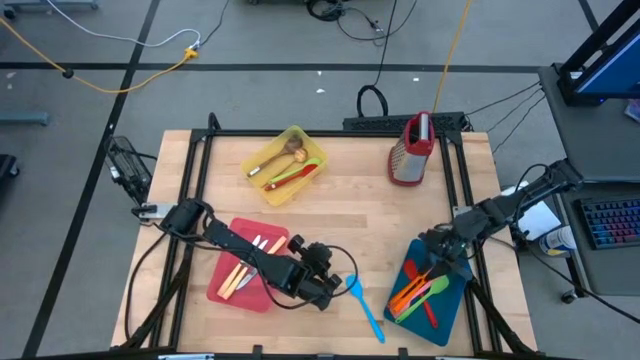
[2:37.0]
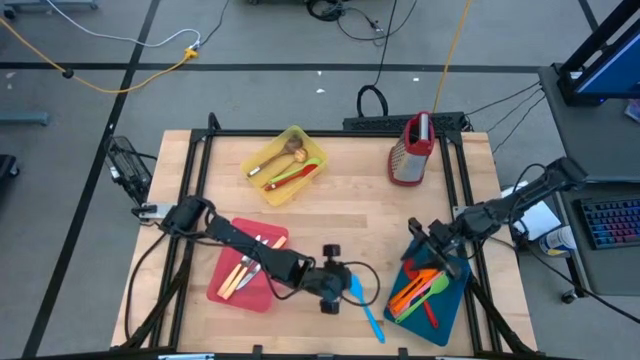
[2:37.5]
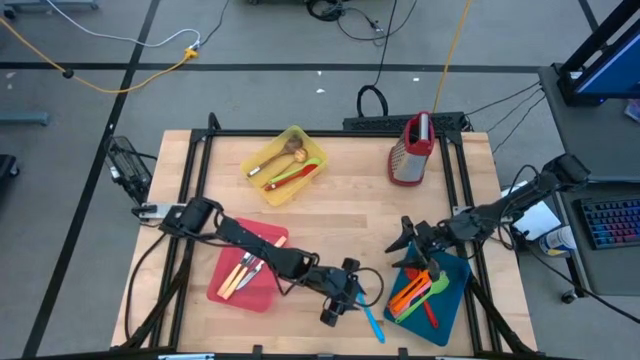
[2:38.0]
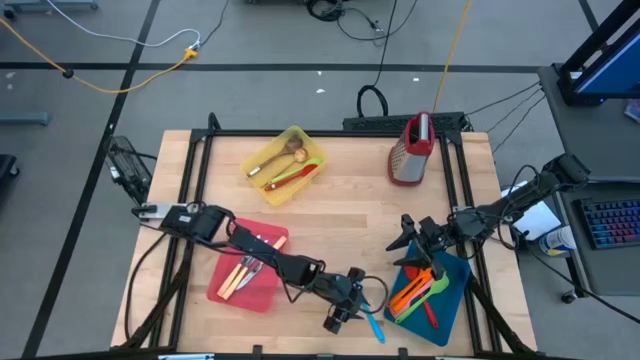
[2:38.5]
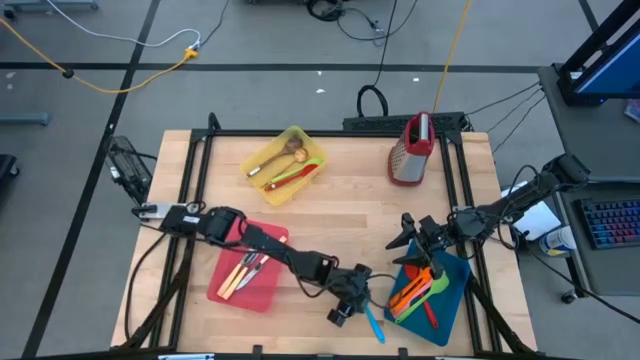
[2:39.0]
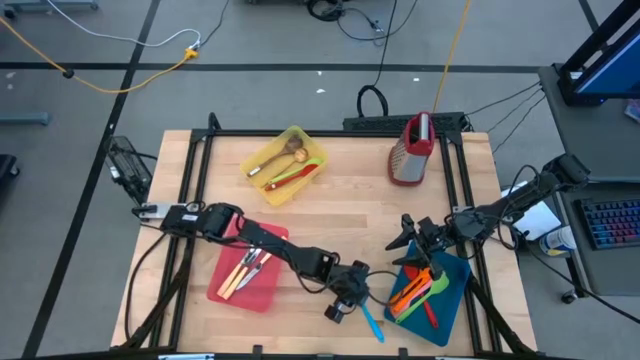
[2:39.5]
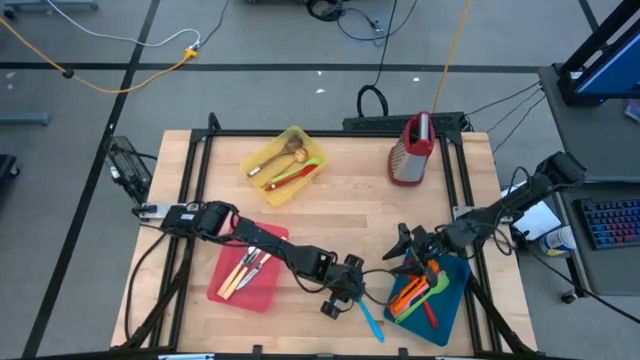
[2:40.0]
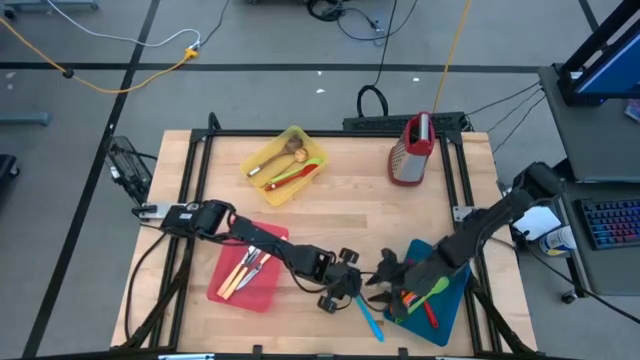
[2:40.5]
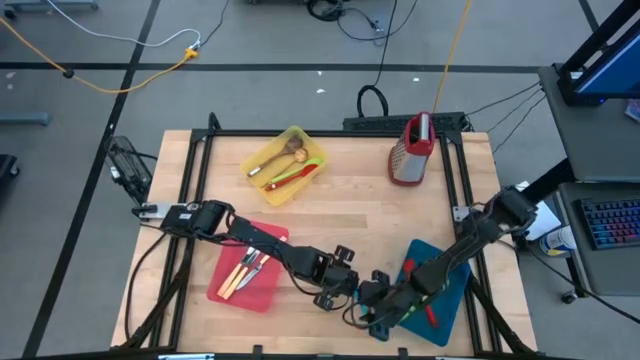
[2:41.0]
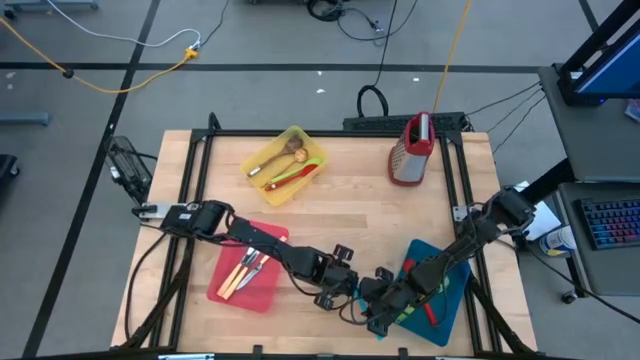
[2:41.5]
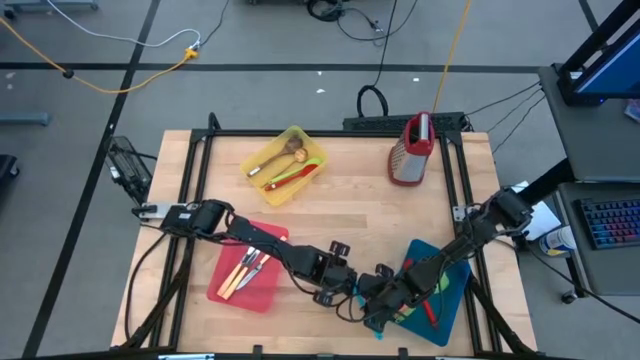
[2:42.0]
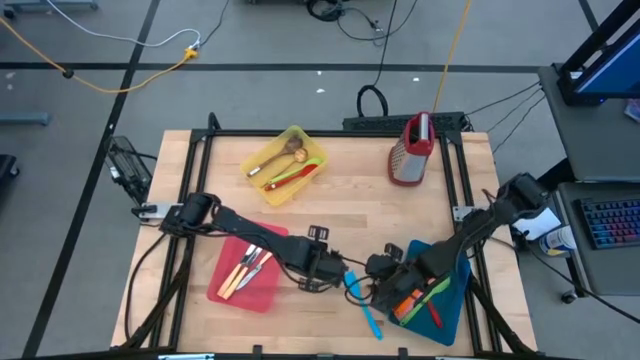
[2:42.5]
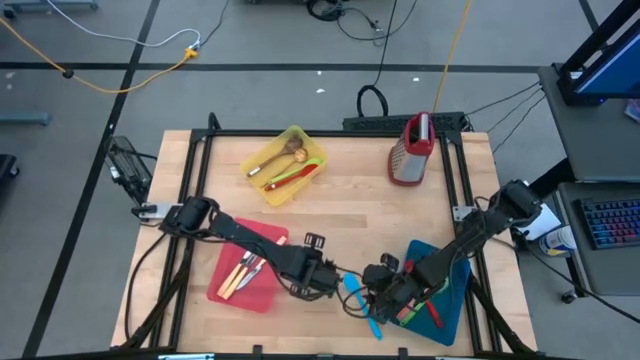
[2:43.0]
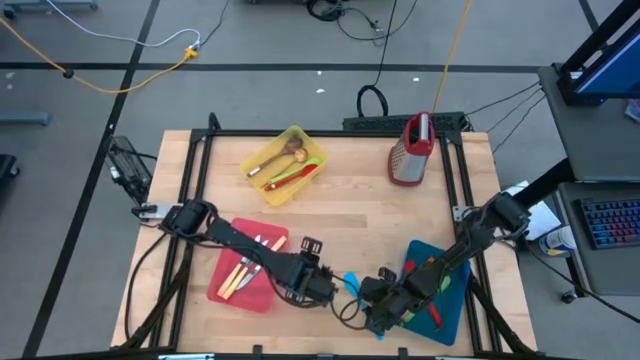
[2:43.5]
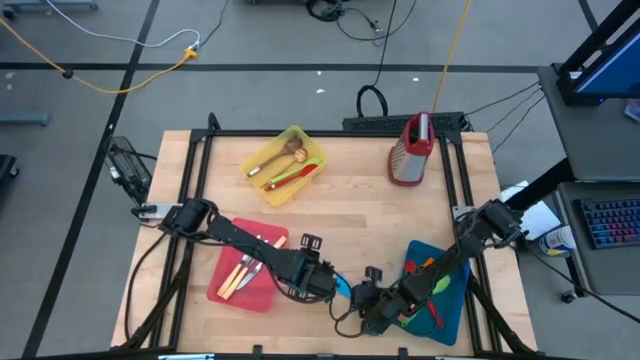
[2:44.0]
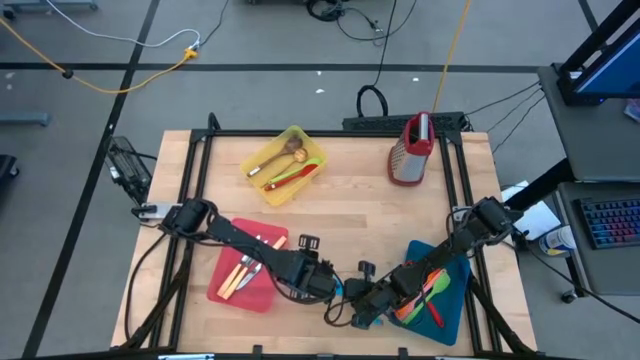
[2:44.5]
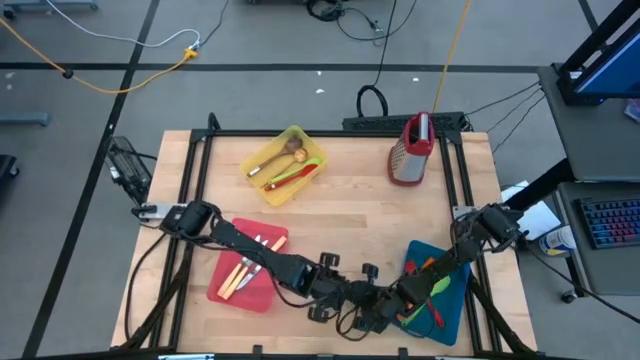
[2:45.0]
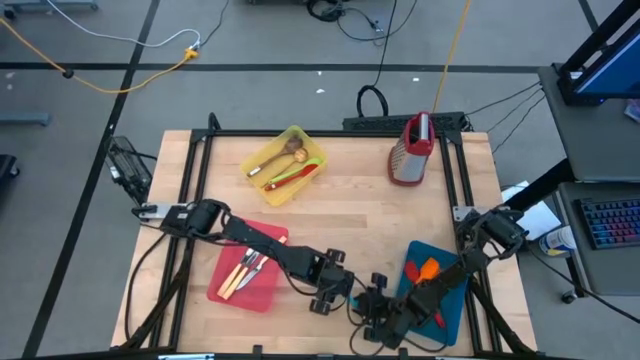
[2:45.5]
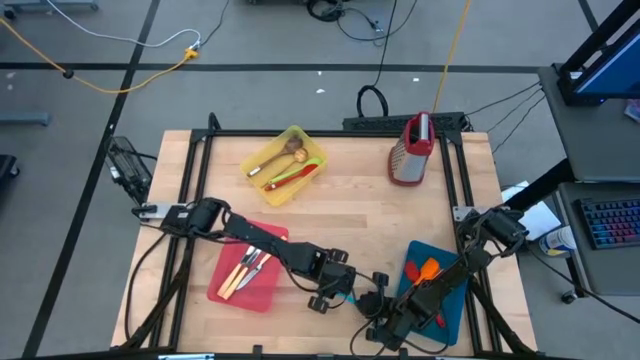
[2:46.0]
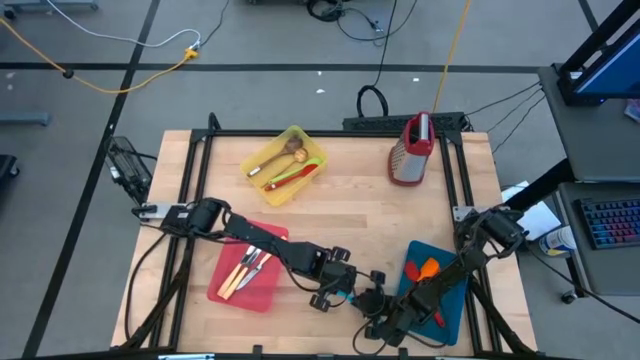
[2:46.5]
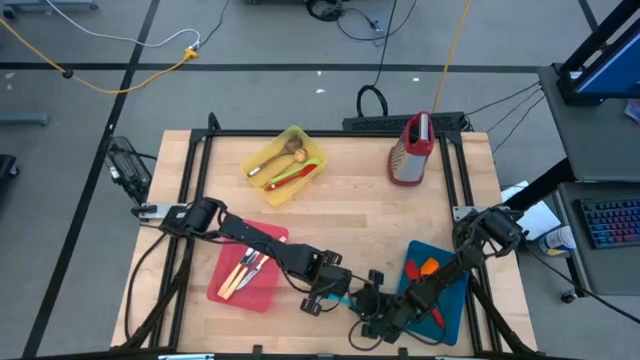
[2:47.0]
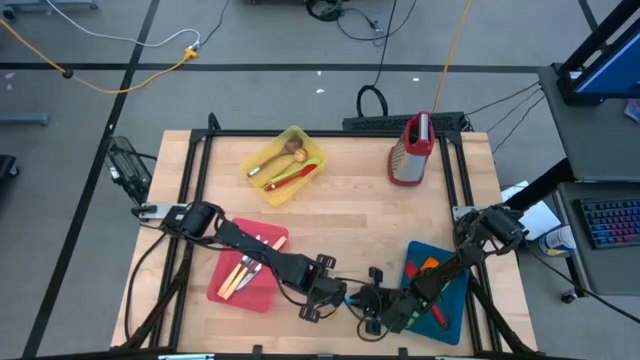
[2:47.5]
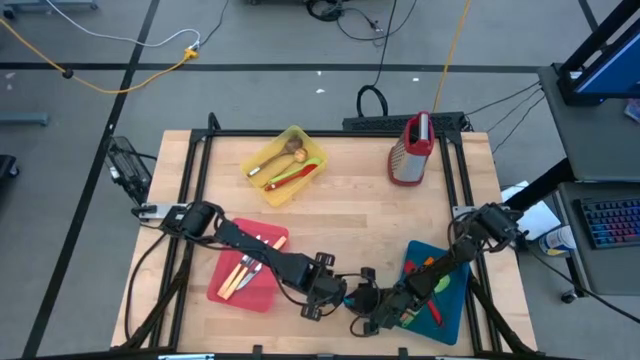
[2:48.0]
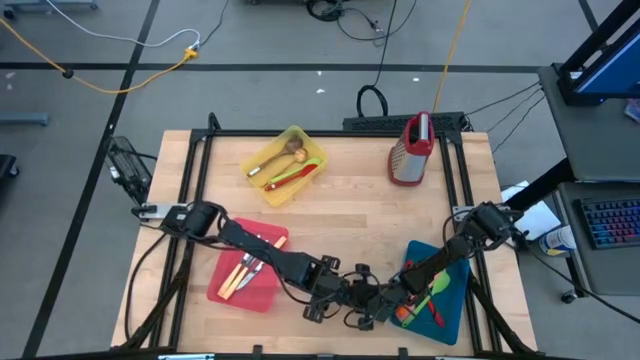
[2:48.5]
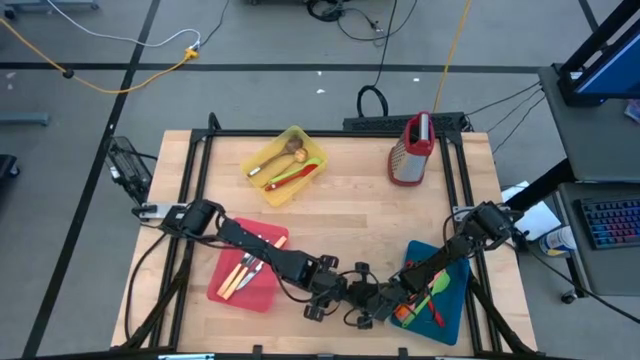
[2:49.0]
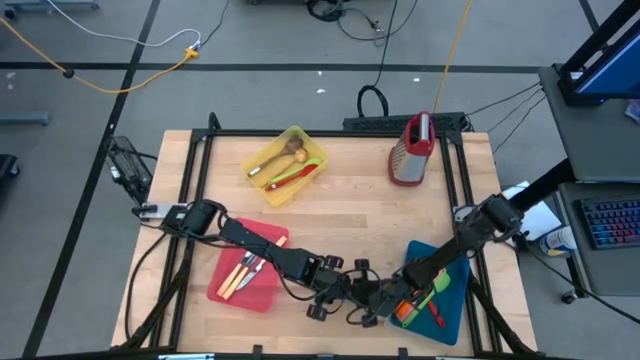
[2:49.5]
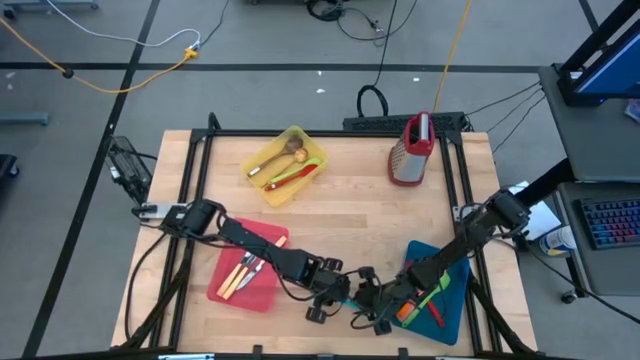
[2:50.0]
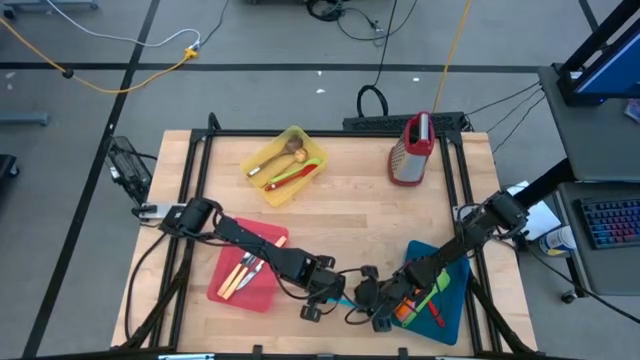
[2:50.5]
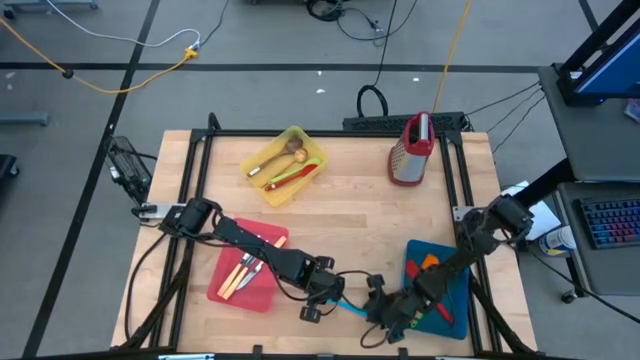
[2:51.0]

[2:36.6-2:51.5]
Task: Pick & Place Kitchen Items
Put the blue spatula into the blue bin

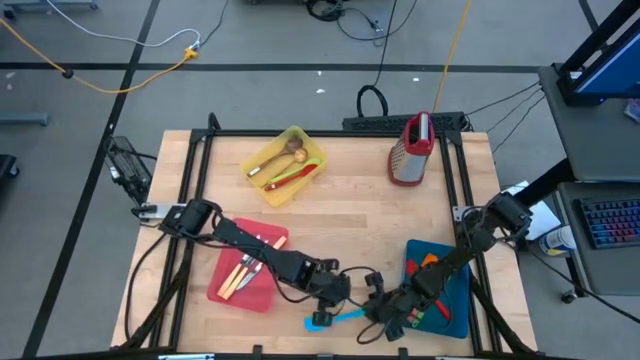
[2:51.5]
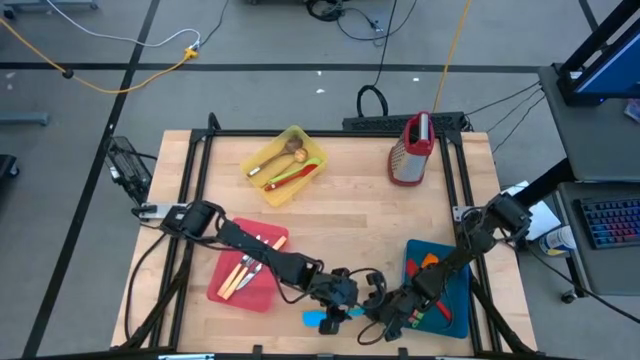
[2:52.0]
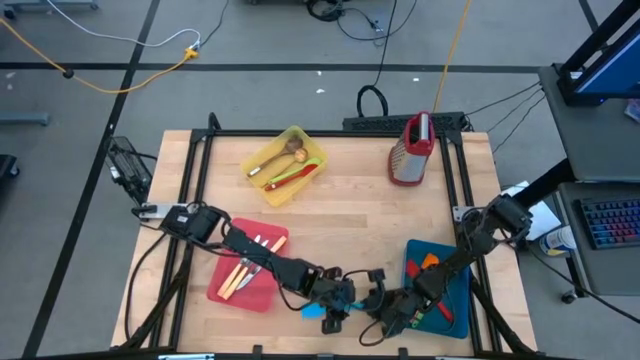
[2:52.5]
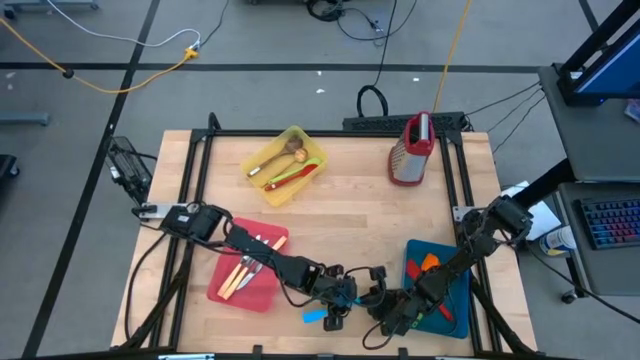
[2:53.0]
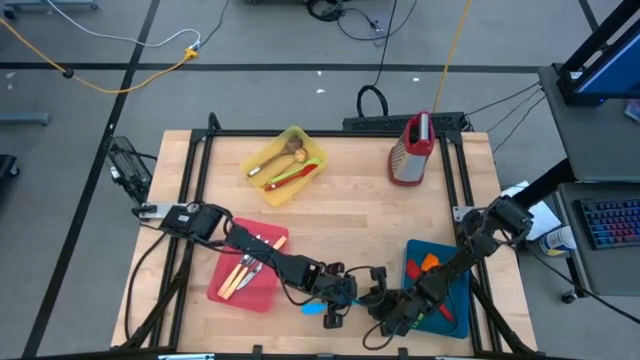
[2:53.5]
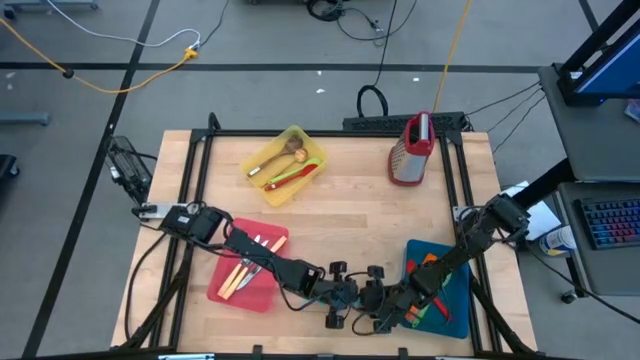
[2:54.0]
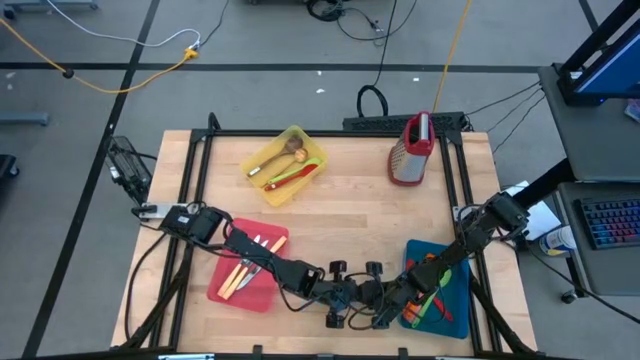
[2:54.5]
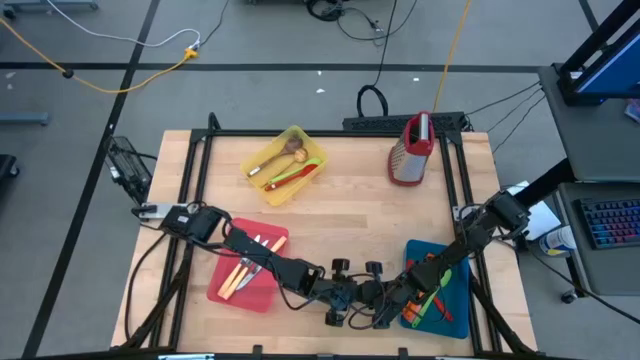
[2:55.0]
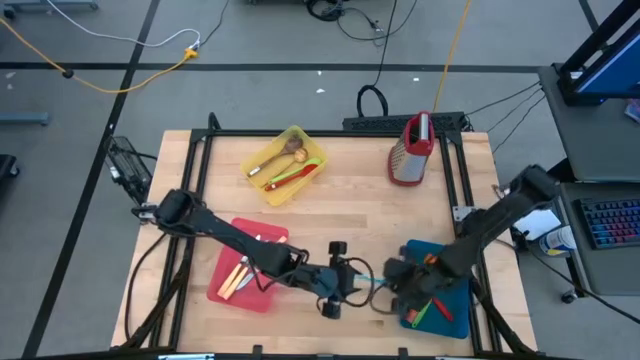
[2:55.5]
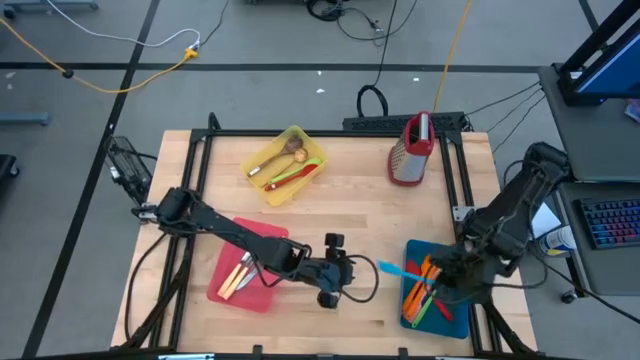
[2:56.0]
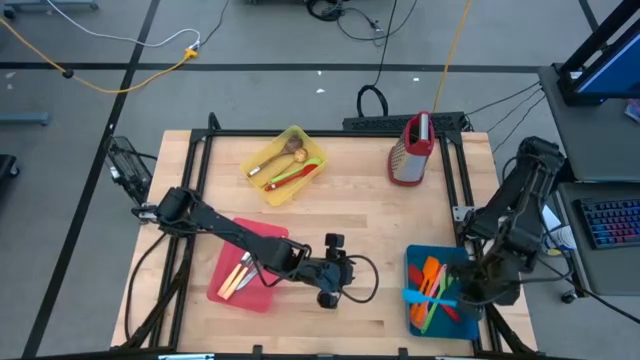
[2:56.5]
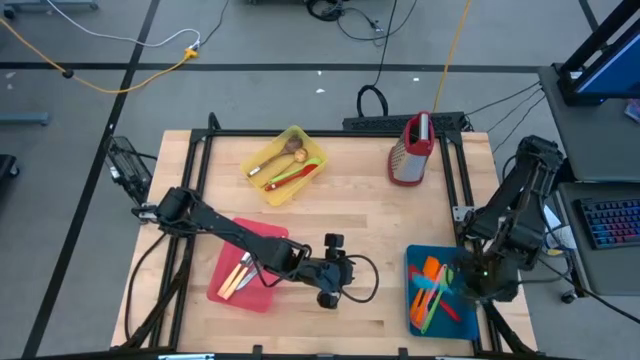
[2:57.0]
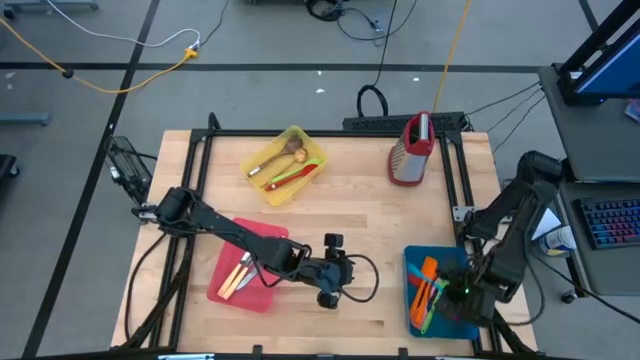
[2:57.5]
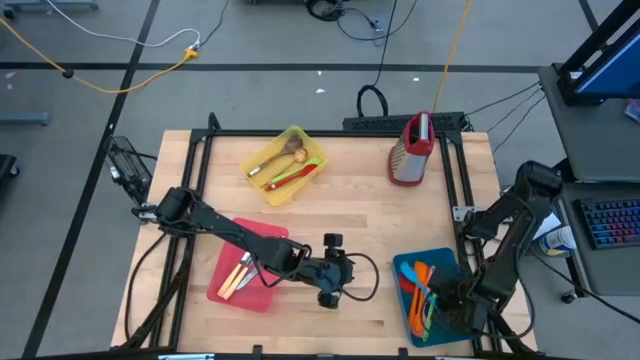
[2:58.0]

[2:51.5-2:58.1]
Put the blue spatula into the blue bin
